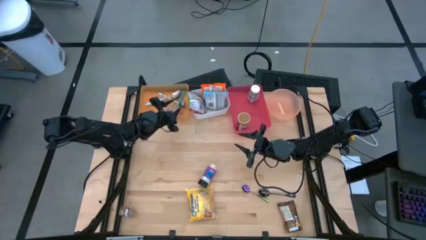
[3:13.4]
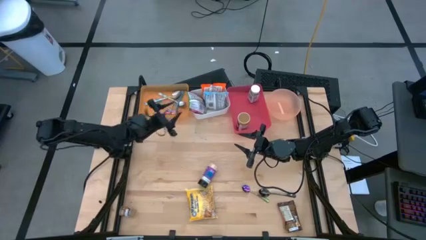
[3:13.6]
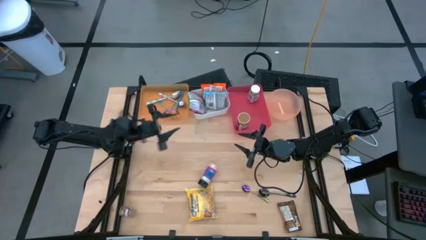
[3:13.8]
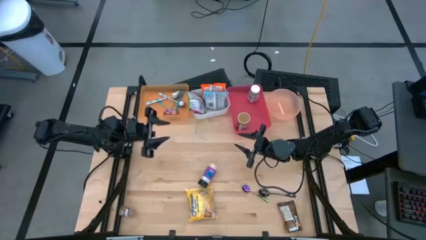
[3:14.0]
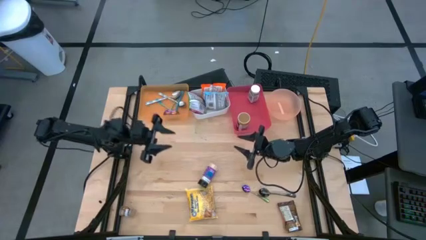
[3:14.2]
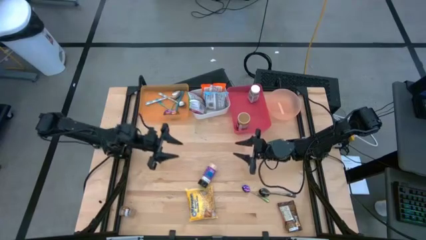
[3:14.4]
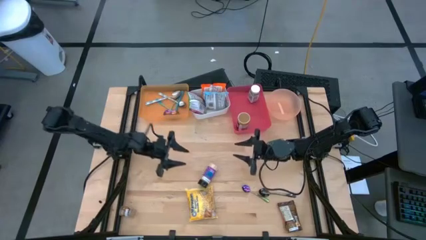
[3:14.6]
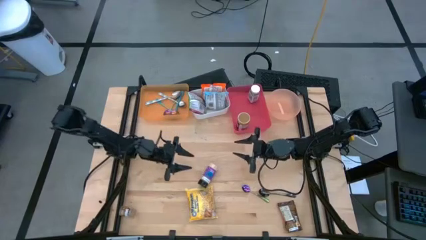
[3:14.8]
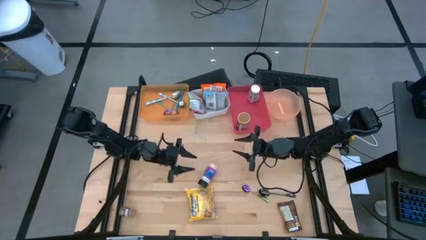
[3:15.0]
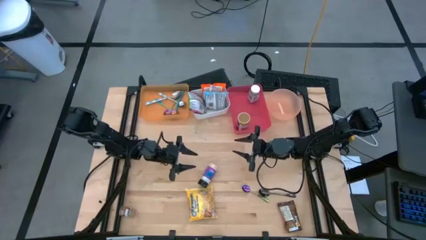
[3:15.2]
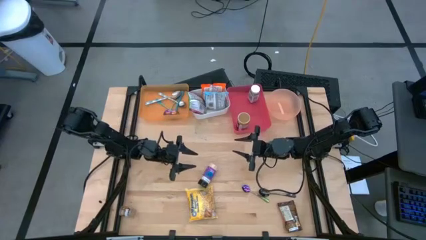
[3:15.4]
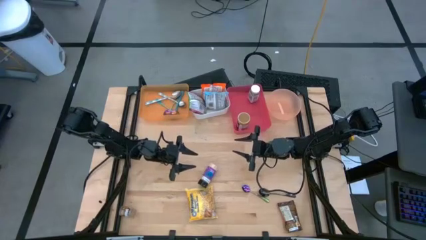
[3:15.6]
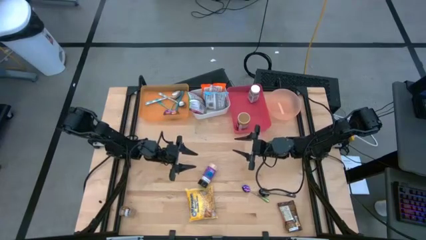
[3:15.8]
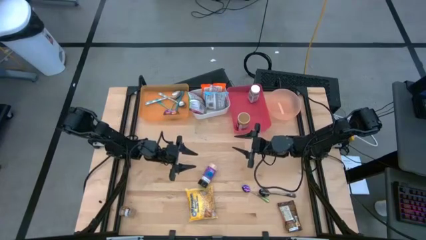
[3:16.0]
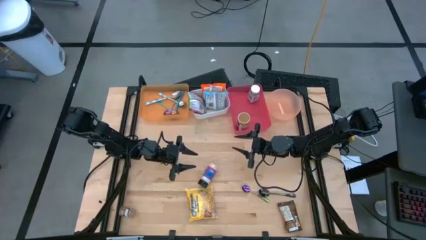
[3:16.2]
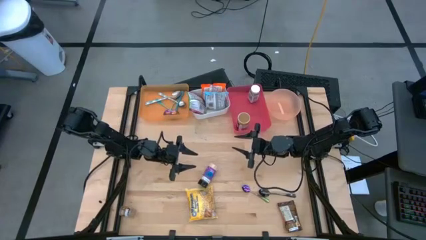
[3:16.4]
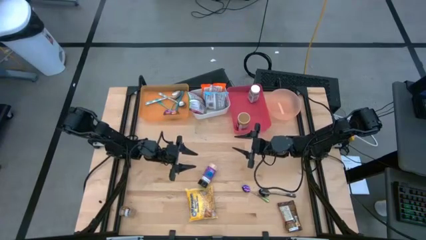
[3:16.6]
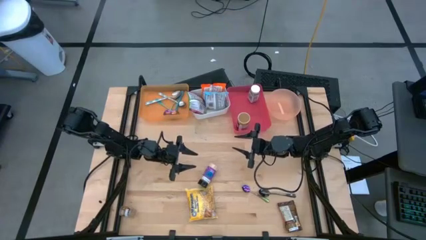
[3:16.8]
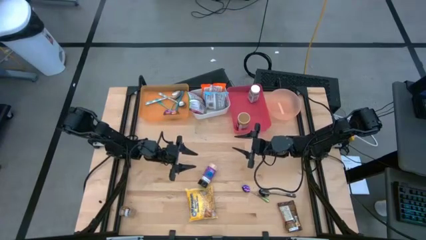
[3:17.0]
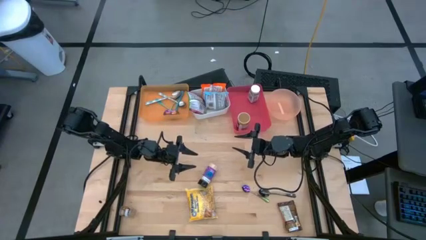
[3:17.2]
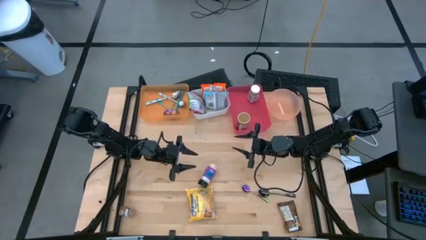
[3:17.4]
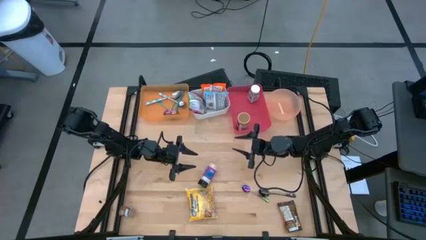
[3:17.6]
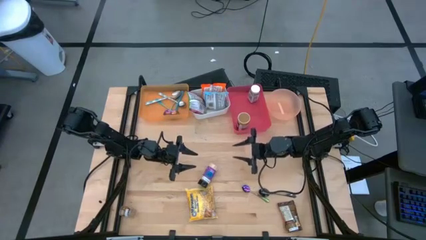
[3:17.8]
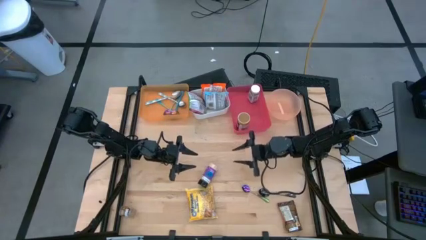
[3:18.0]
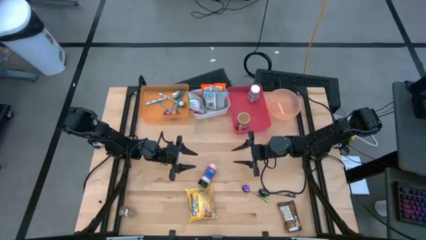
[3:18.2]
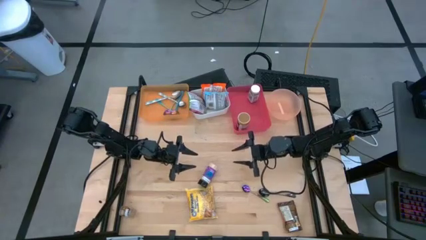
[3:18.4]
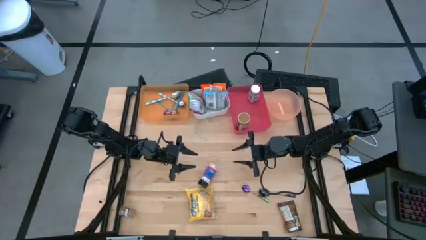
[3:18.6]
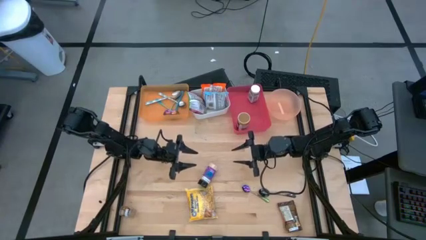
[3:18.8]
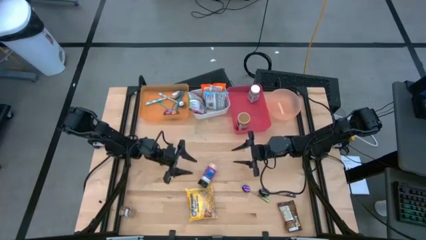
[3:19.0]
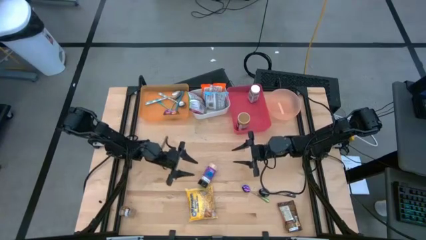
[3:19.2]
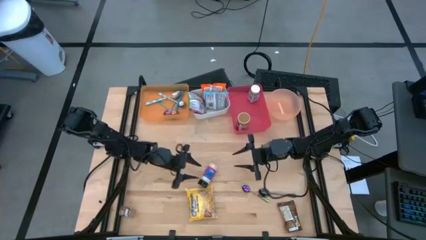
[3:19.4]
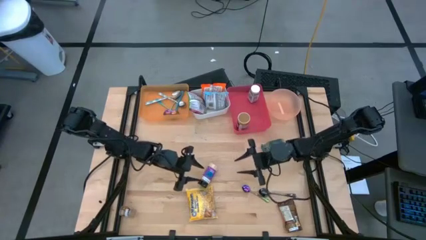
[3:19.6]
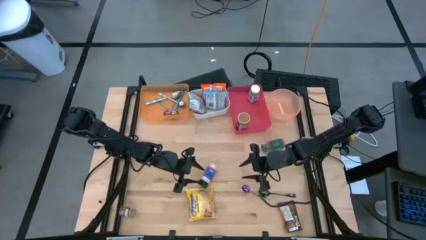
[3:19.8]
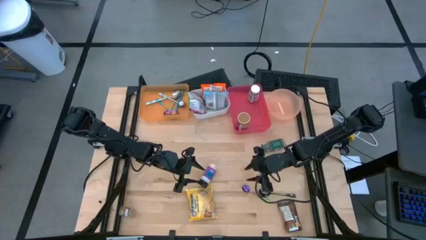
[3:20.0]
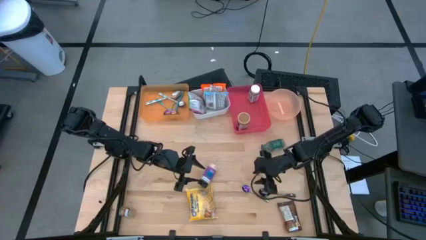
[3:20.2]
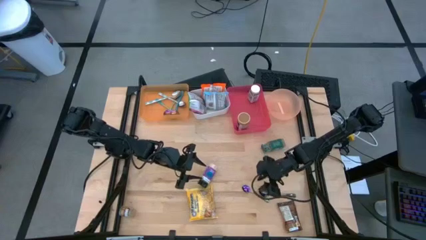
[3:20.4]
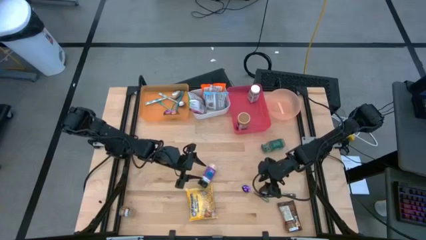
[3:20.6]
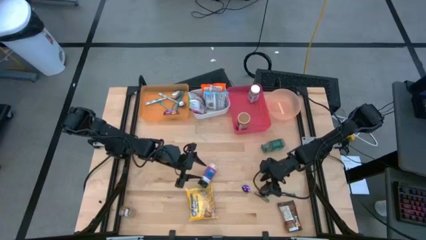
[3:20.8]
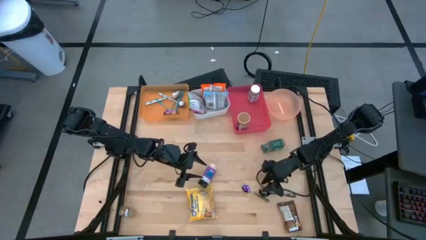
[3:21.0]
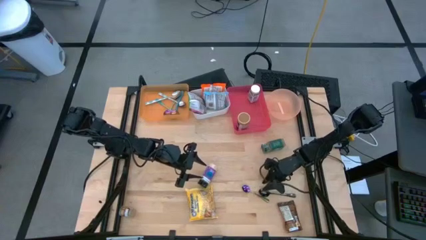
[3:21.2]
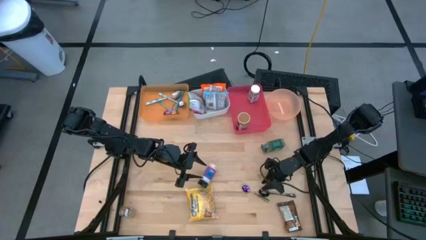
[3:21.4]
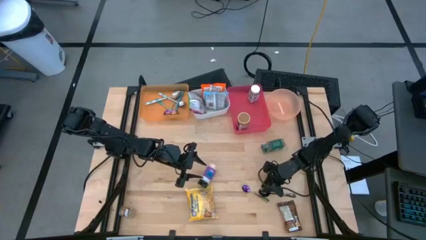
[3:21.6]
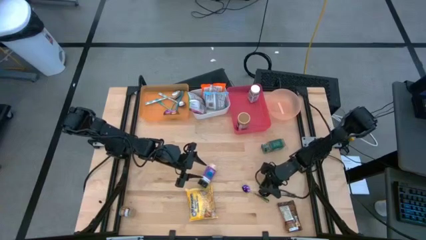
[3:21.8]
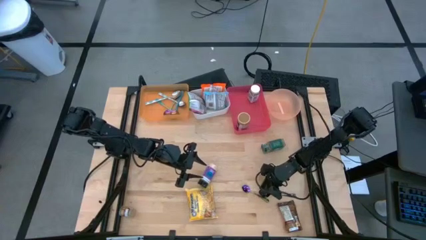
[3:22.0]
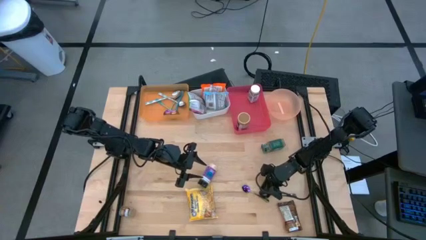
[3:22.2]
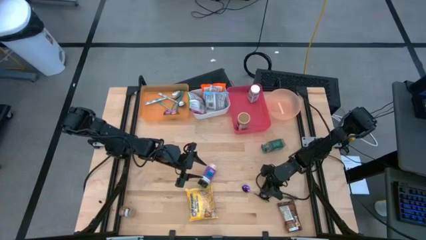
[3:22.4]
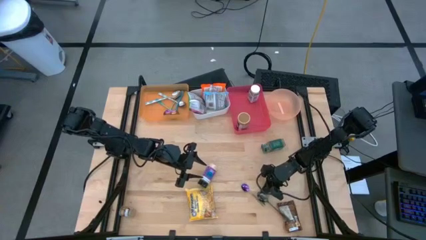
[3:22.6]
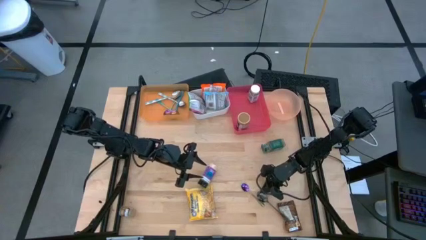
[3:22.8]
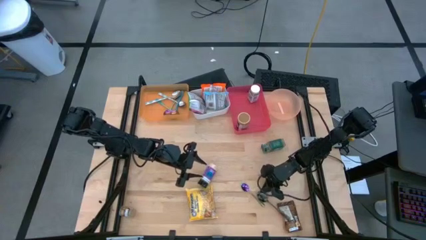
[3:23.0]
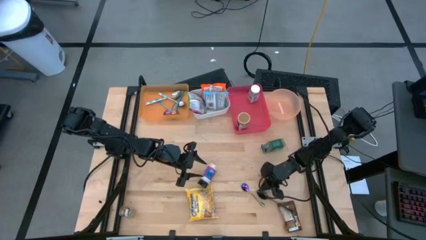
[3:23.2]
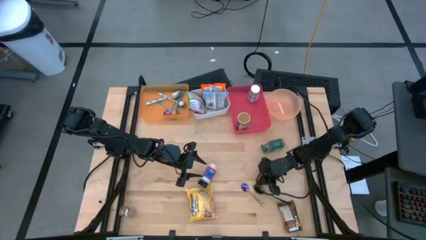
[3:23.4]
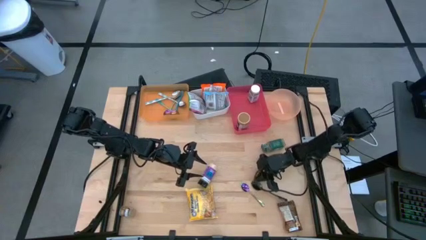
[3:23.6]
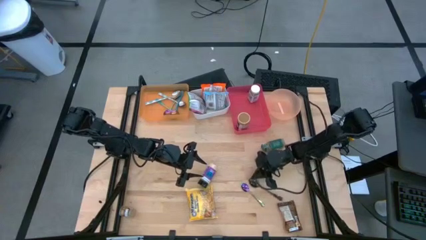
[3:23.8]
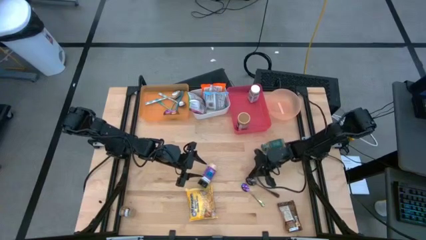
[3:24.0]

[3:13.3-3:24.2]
Task: Pick & Place Food Item
Put the black spoon into the orange bin
